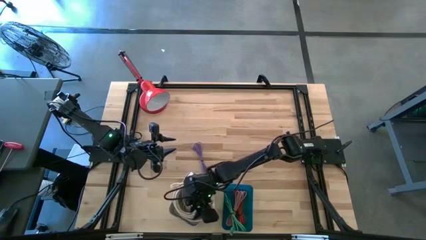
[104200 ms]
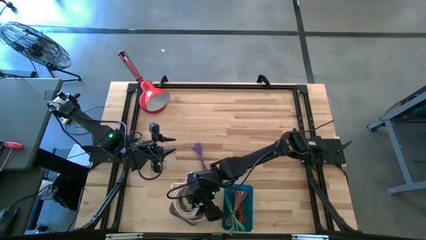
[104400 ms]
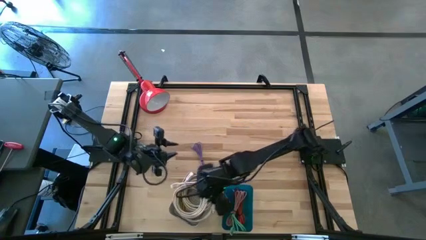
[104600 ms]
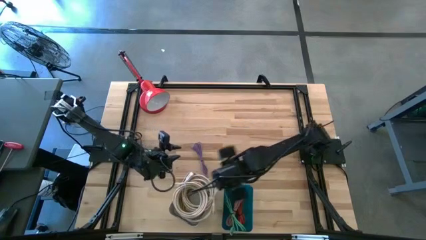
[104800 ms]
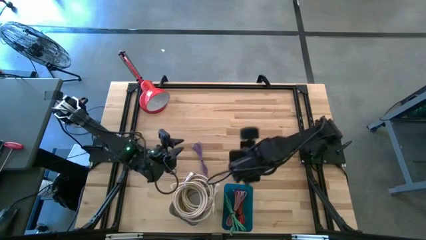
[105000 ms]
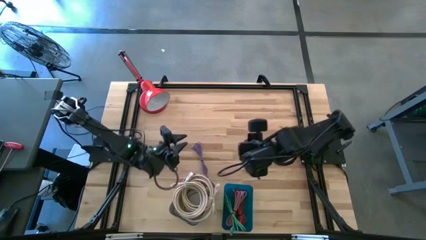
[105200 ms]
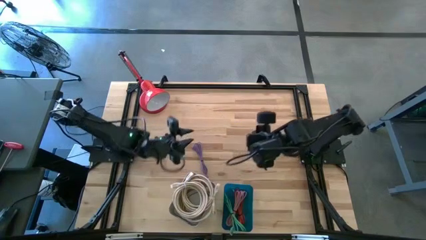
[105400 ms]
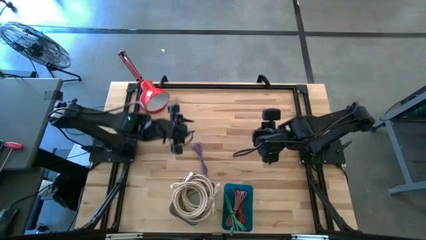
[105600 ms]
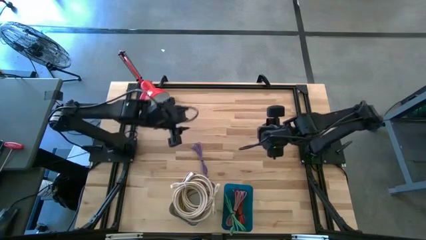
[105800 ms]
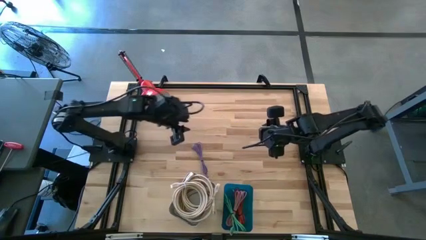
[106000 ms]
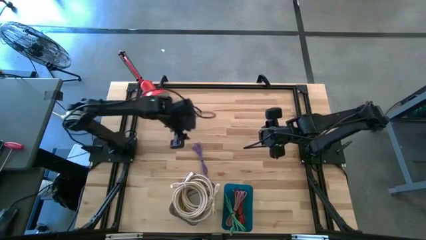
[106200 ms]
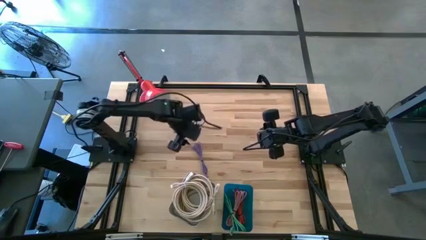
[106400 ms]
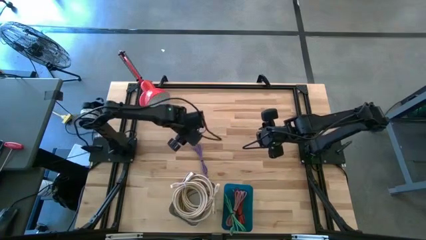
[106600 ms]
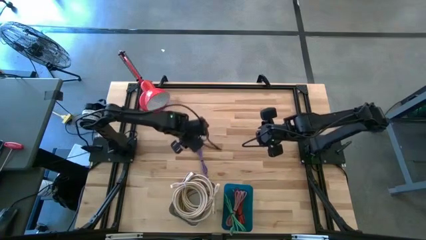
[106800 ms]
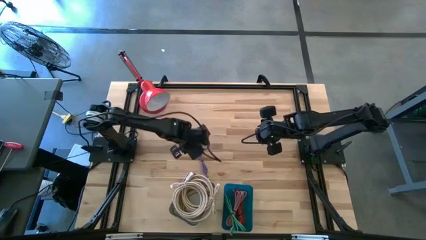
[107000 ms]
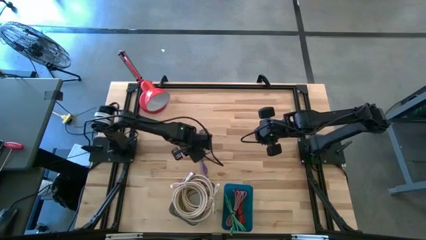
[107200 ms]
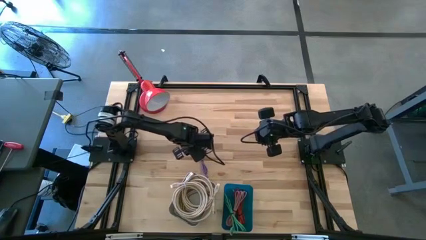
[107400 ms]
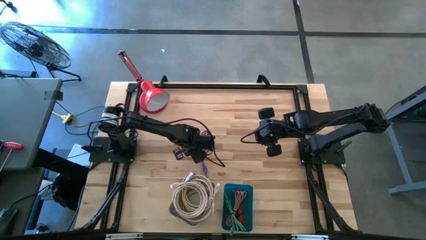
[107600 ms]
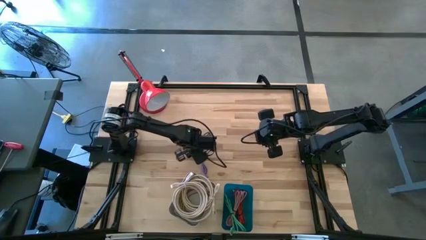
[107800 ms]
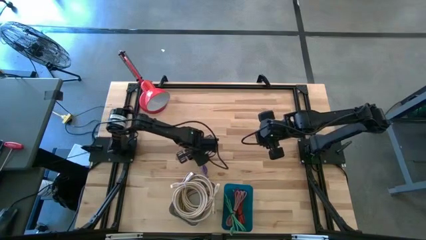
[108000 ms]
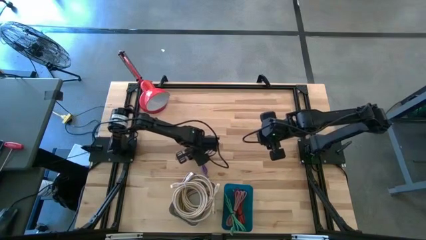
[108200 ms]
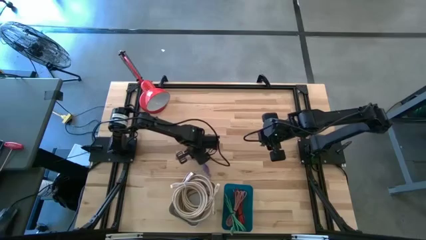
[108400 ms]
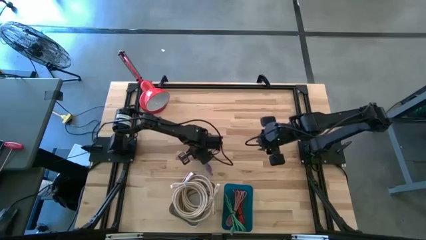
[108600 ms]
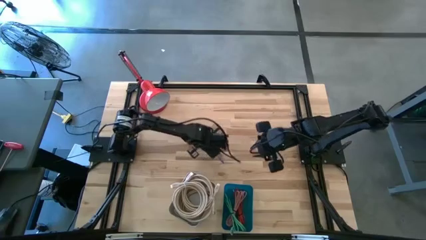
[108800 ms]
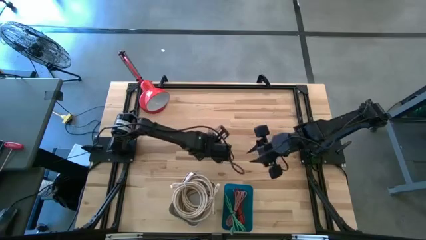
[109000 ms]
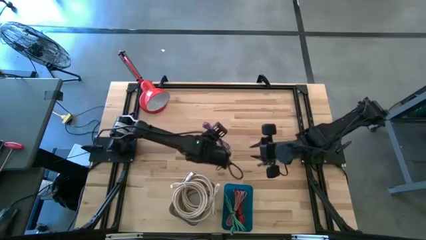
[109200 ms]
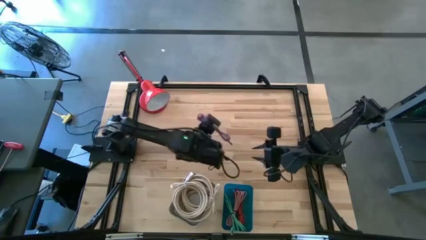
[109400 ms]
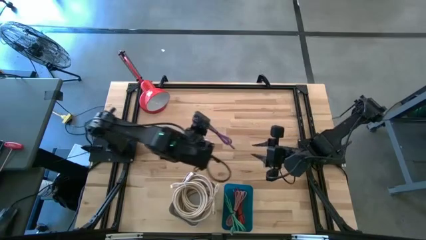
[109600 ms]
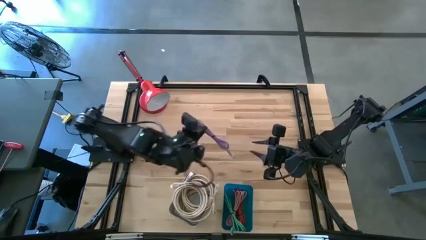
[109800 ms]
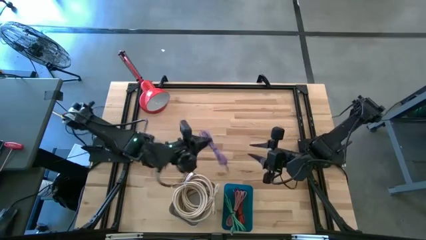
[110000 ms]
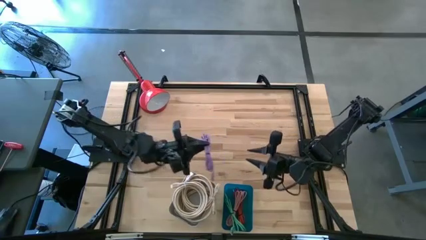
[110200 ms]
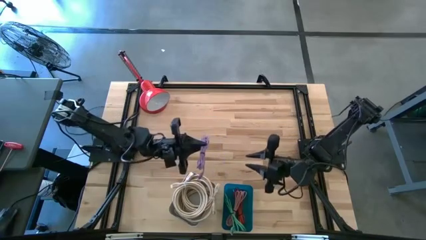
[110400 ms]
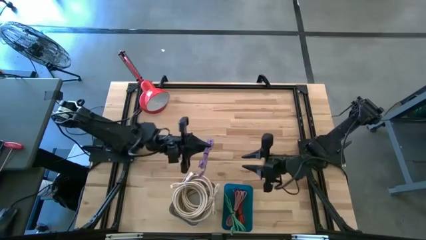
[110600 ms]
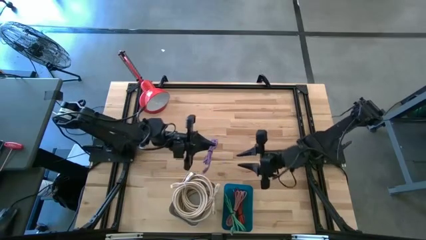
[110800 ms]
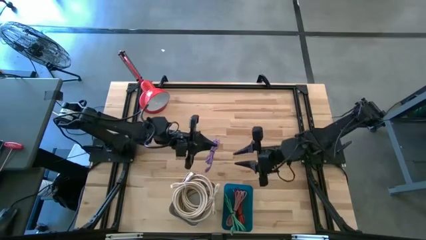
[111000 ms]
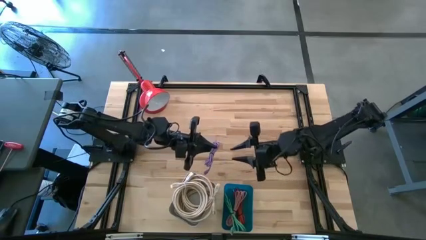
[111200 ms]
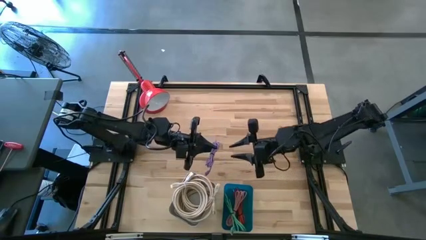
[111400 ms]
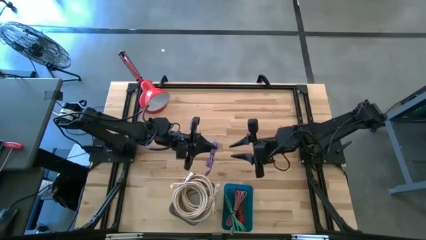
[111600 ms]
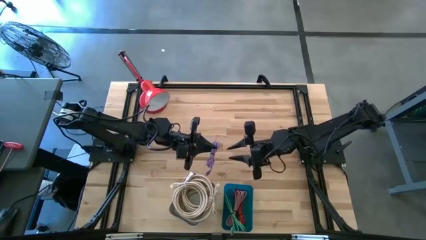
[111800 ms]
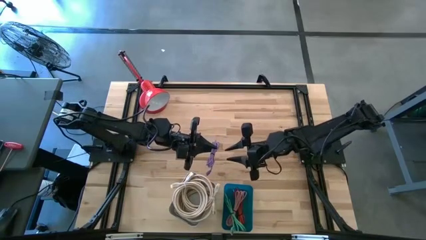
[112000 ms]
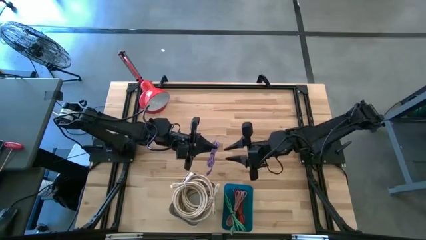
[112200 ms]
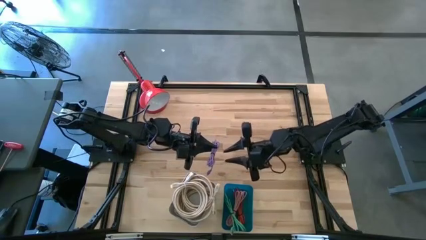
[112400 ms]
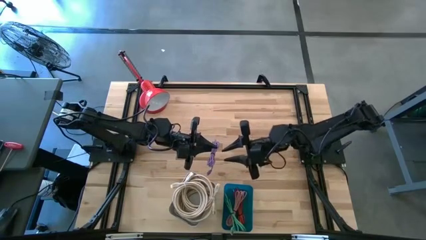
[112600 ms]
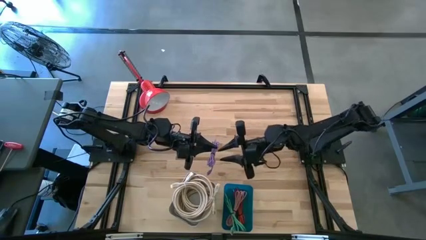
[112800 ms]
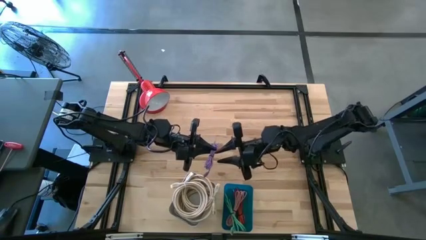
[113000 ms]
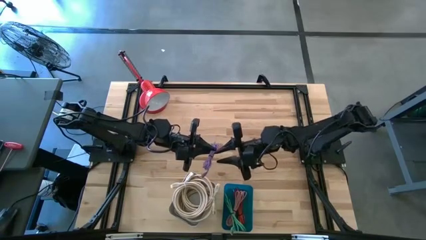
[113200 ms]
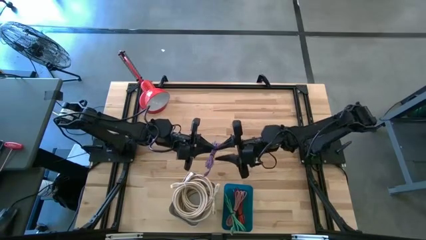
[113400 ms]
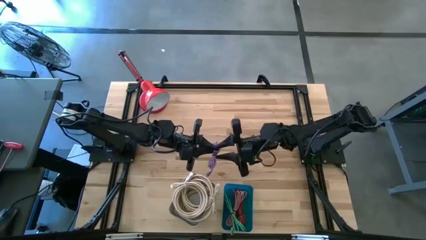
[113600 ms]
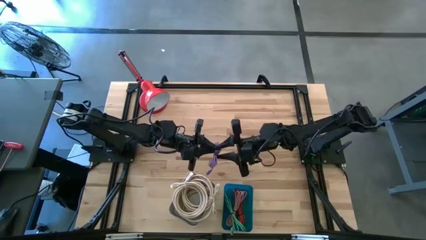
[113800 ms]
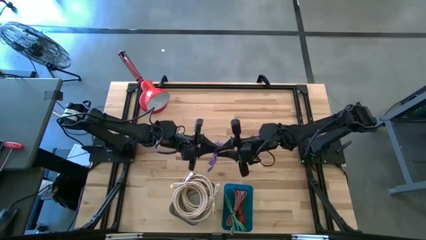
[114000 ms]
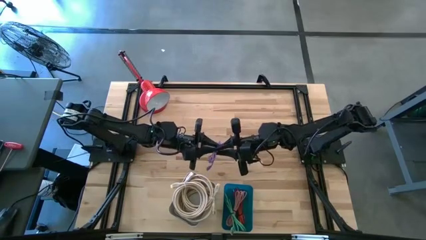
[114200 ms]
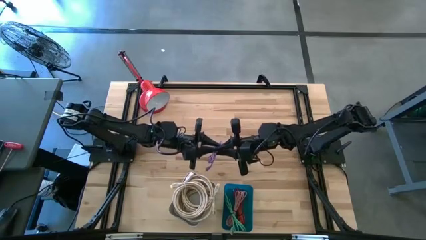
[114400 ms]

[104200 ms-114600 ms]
Task: Pick & Place USB Port
Put the violet USB cable into the blue bin

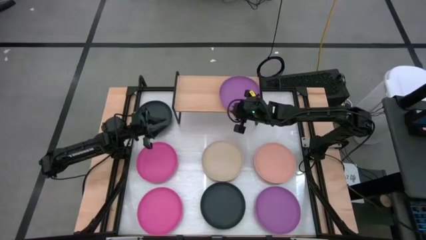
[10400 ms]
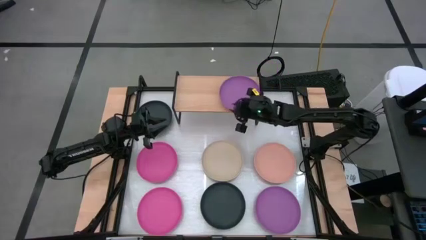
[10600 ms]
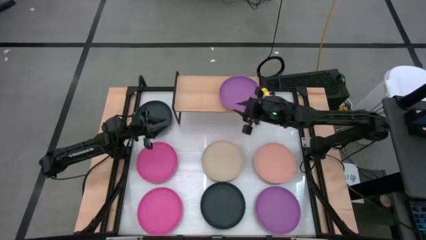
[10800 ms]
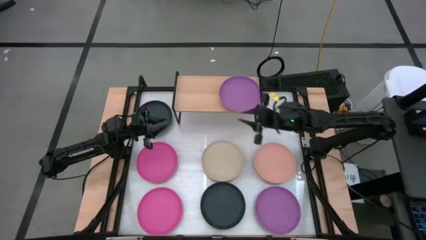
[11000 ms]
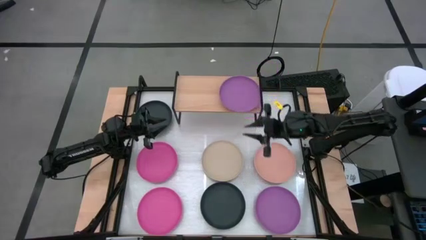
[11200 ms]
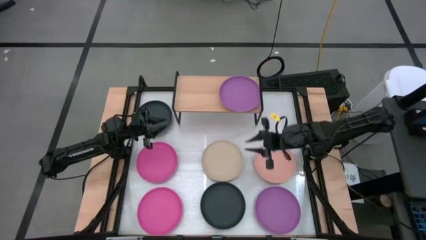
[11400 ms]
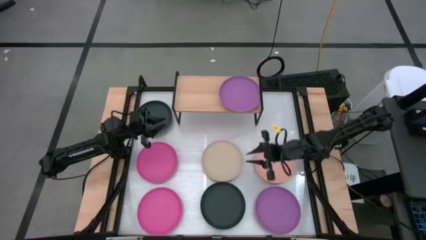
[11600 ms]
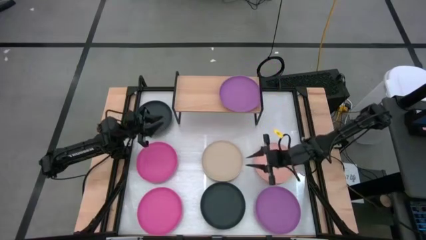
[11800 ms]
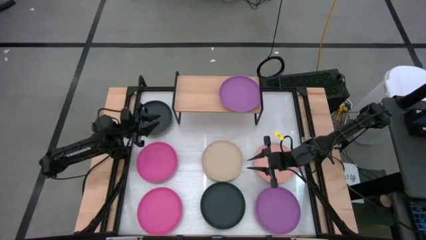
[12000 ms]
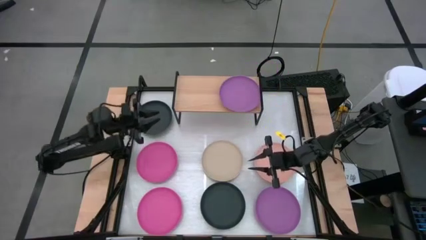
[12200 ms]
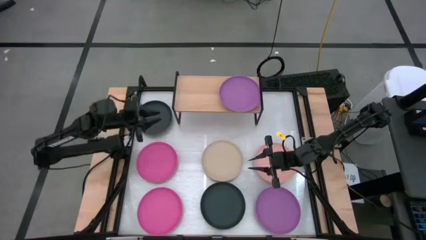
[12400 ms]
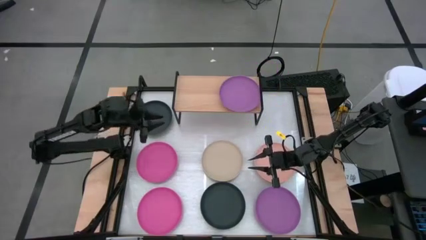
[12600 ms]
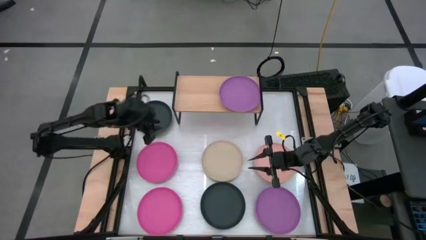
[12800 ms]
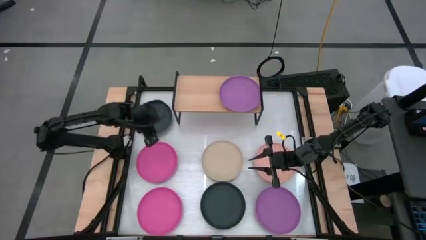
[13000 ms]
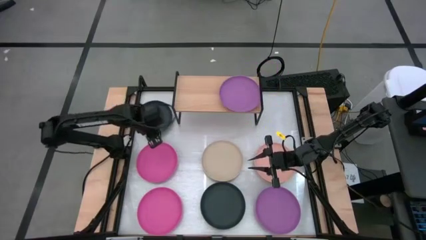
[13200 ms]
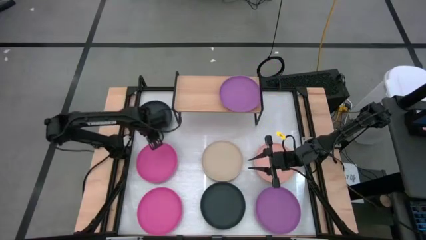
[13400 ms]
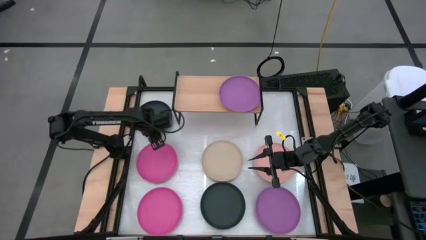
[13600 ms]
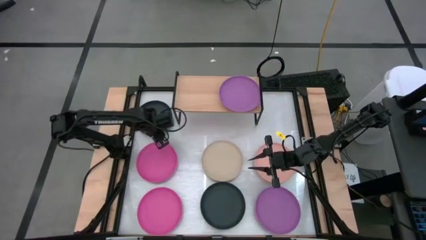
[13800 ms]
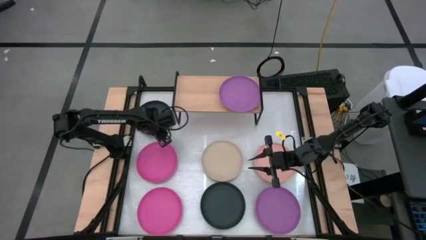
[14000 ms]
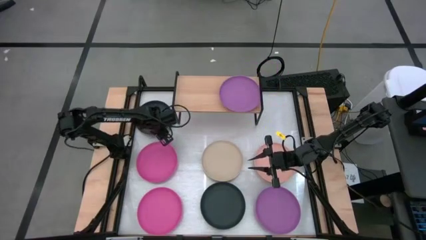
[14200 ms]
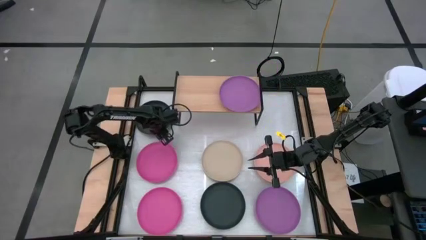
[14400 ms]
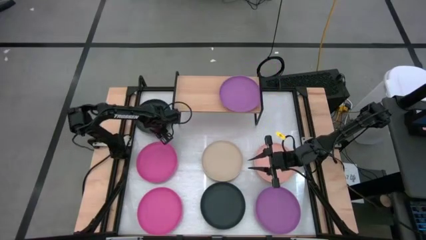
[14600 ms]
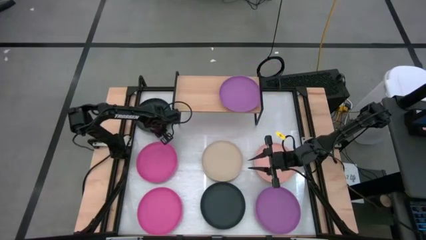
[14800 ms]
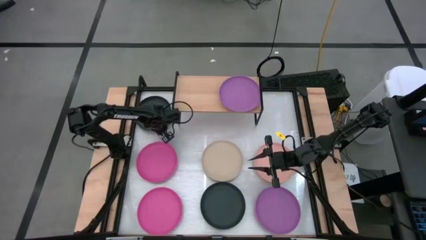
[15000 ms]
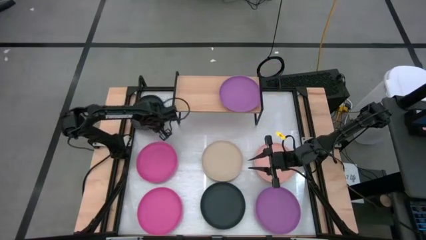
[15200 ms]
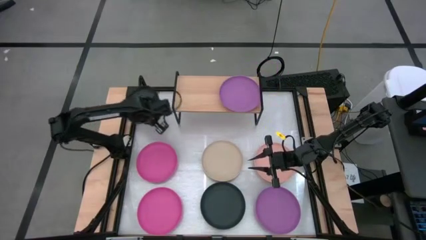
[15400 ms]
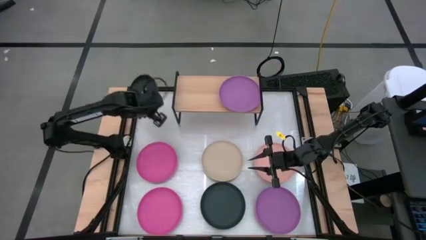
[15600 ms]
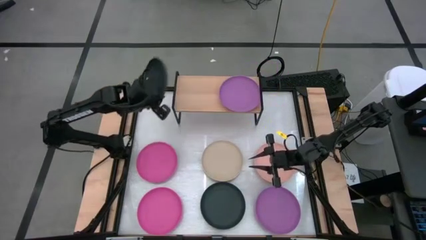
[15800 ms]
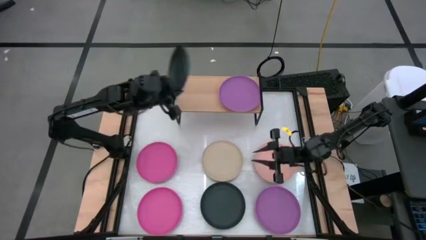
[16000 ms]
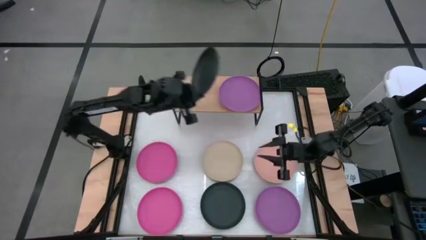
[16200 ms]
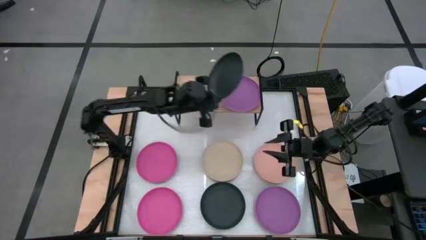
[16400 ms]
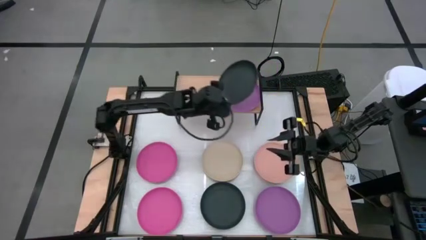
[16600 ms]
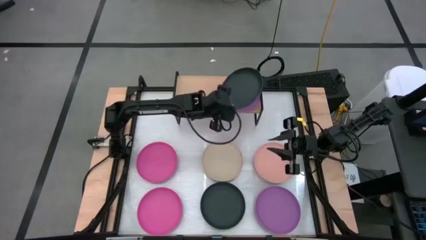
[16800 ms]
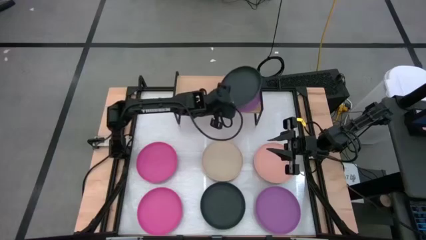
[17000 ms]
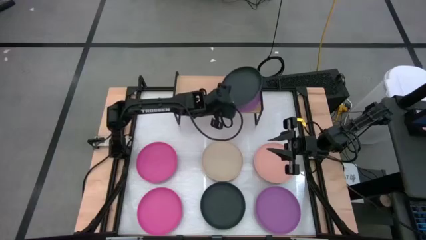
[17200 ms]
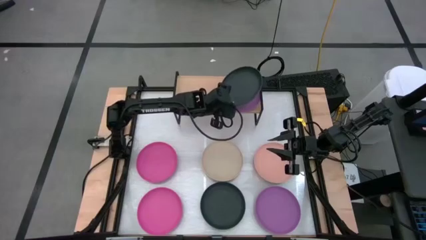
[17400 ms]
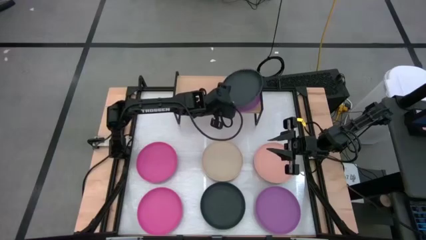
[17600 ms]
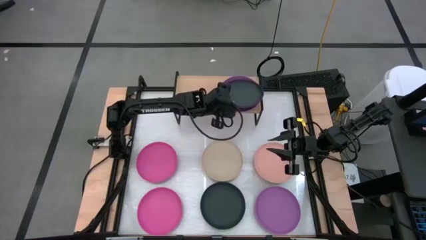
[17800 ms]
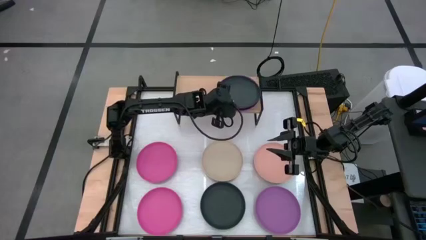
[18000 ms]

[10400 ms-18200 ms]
Task: Place and stack plates onto a shelf
Stack the top black plate on top of the violet plate on the shelf
